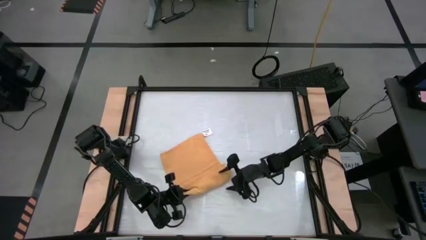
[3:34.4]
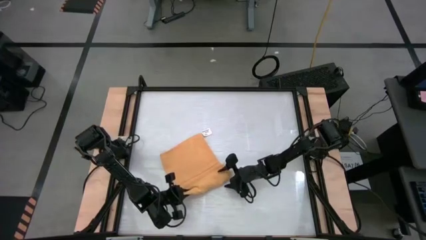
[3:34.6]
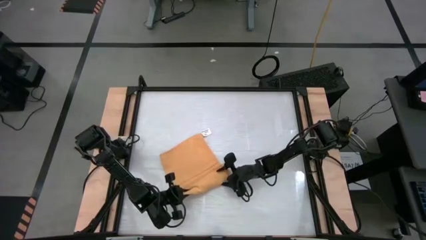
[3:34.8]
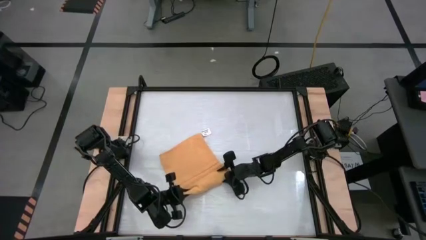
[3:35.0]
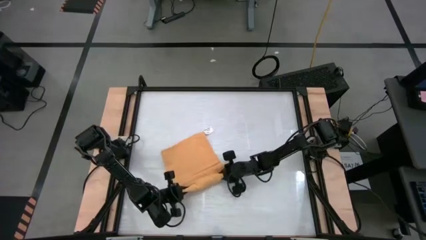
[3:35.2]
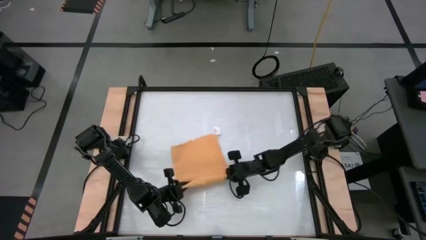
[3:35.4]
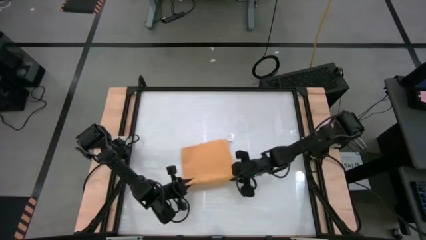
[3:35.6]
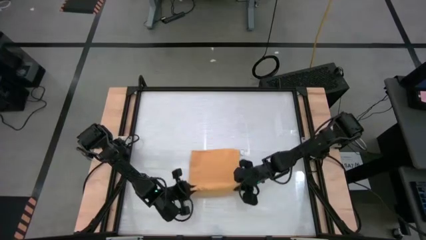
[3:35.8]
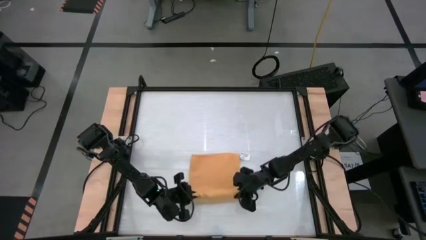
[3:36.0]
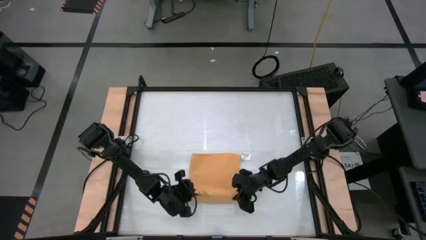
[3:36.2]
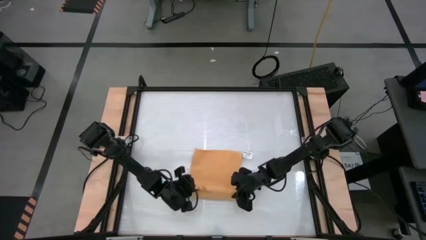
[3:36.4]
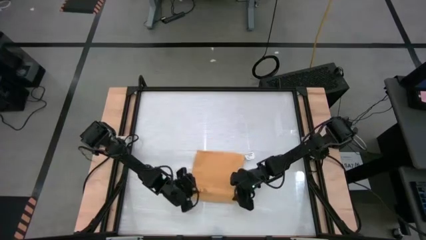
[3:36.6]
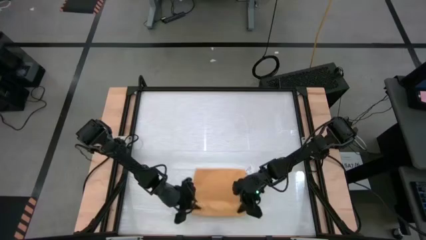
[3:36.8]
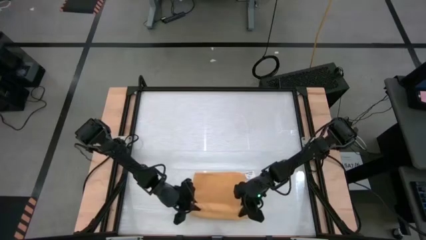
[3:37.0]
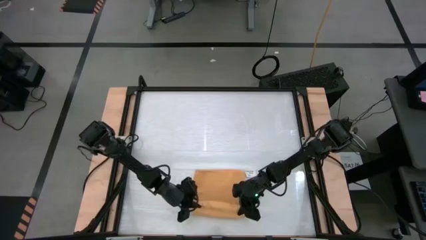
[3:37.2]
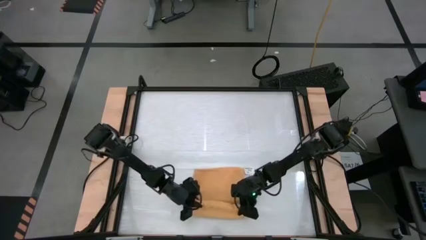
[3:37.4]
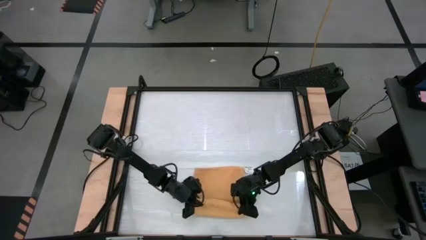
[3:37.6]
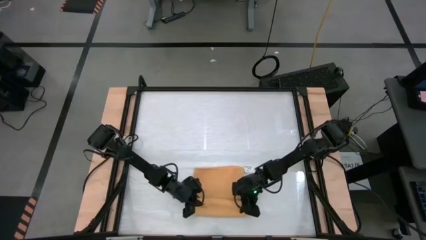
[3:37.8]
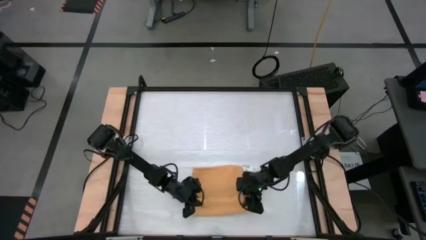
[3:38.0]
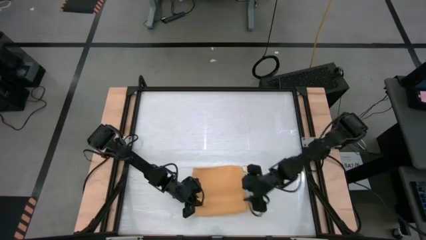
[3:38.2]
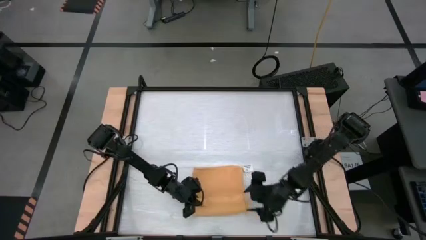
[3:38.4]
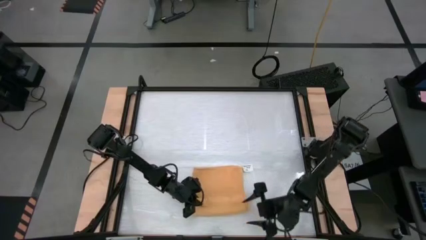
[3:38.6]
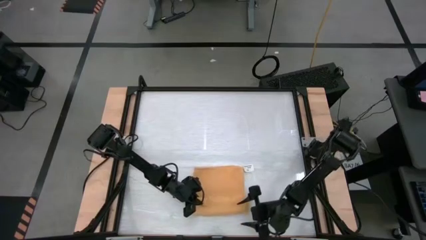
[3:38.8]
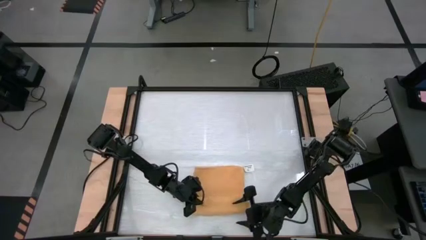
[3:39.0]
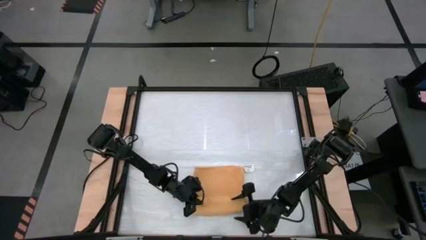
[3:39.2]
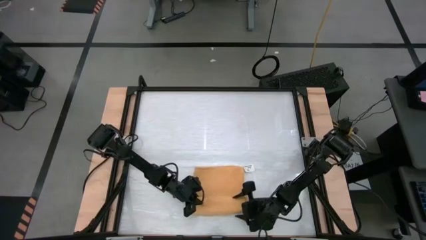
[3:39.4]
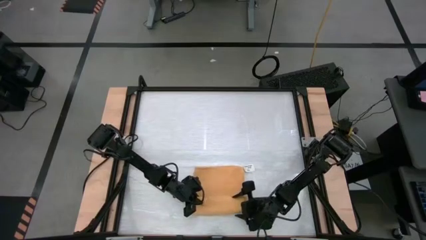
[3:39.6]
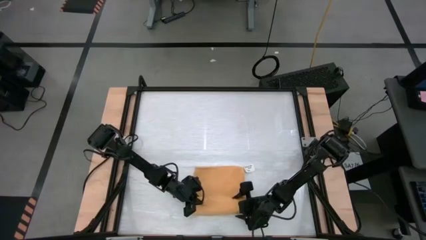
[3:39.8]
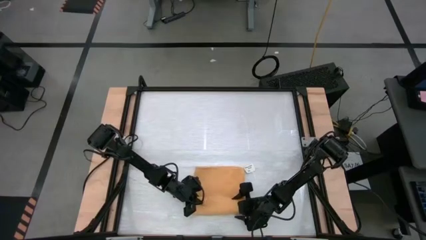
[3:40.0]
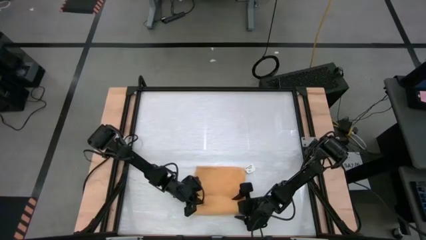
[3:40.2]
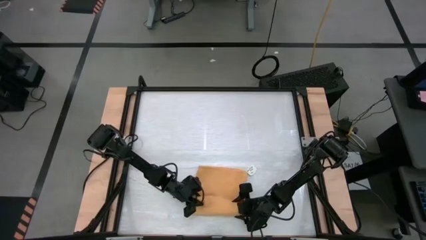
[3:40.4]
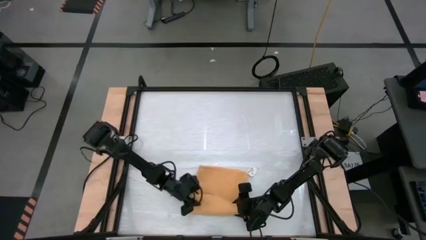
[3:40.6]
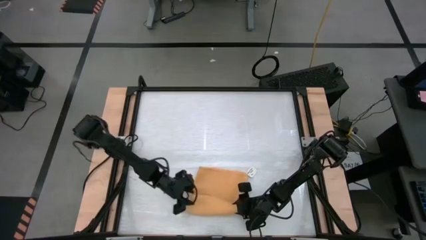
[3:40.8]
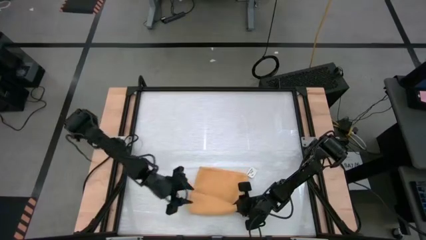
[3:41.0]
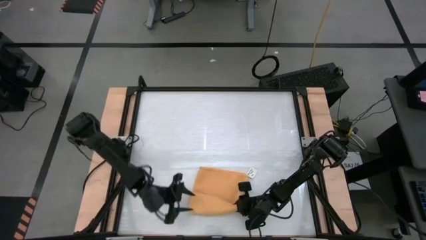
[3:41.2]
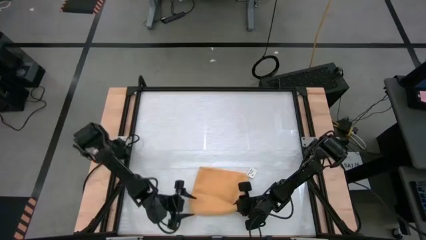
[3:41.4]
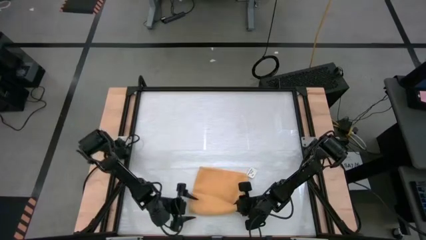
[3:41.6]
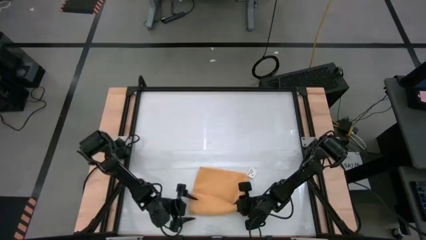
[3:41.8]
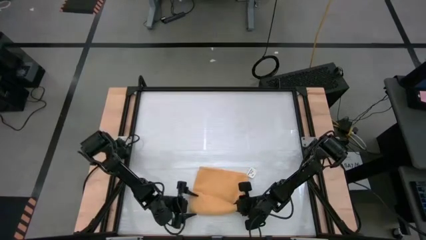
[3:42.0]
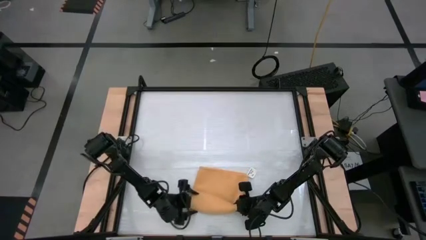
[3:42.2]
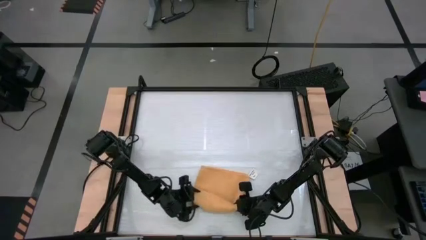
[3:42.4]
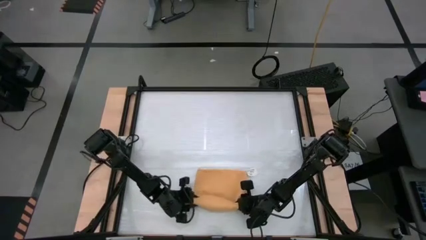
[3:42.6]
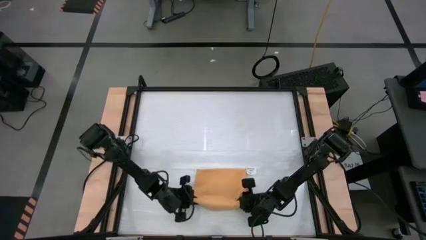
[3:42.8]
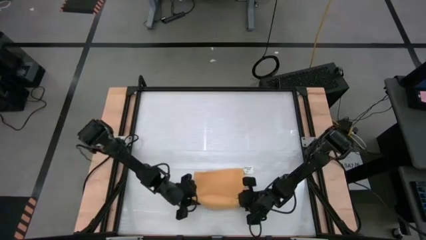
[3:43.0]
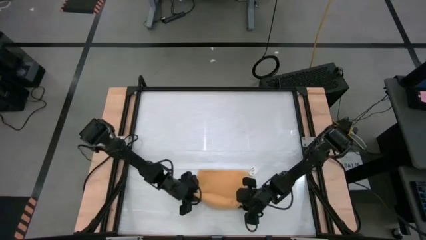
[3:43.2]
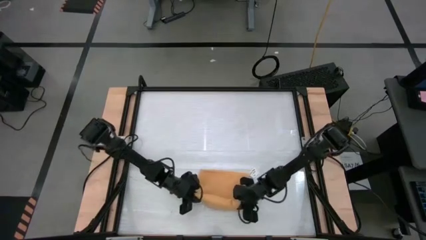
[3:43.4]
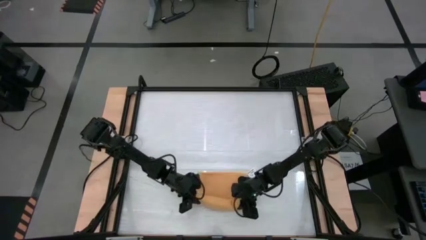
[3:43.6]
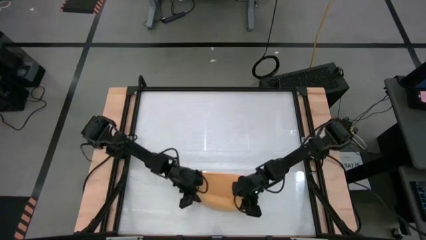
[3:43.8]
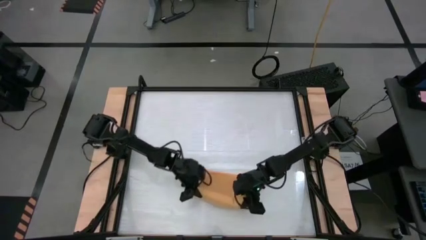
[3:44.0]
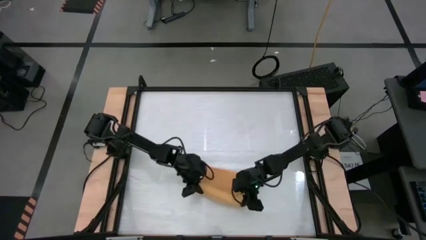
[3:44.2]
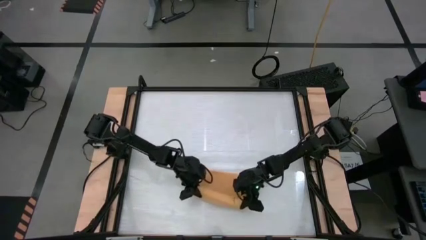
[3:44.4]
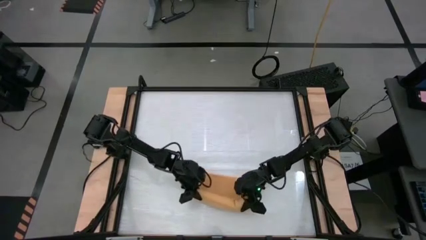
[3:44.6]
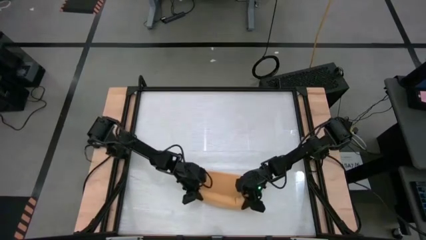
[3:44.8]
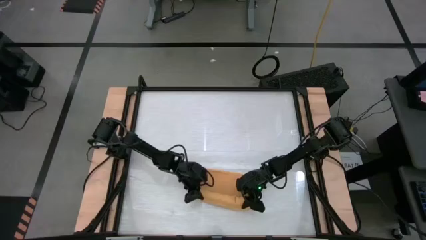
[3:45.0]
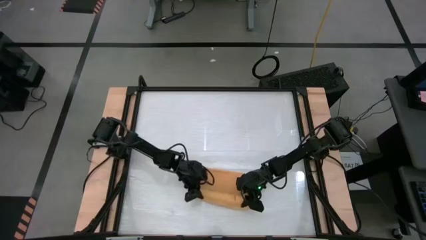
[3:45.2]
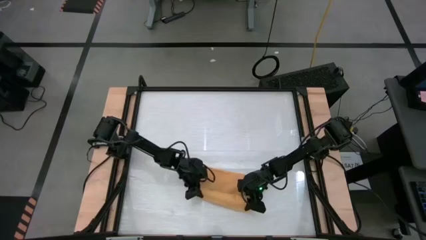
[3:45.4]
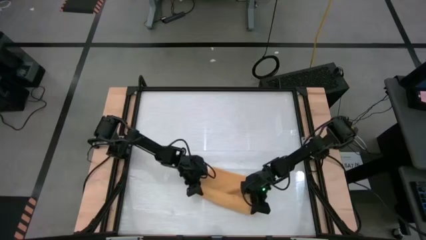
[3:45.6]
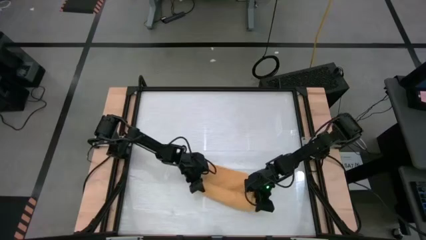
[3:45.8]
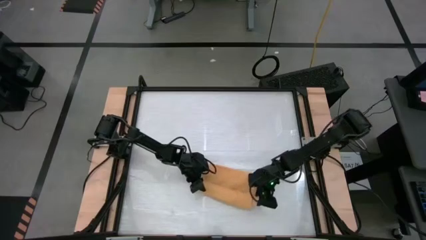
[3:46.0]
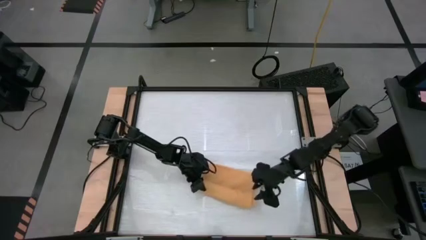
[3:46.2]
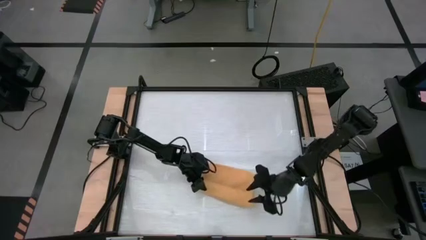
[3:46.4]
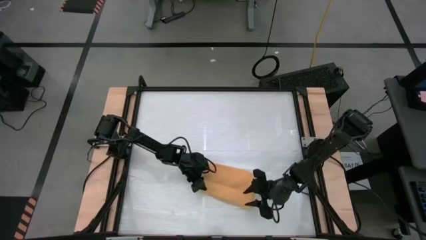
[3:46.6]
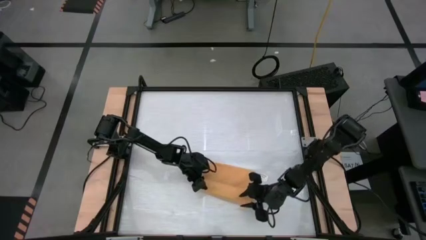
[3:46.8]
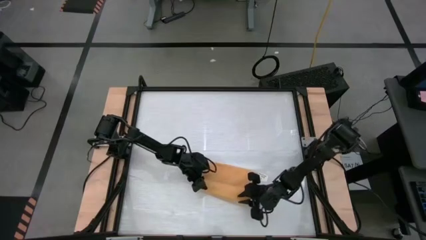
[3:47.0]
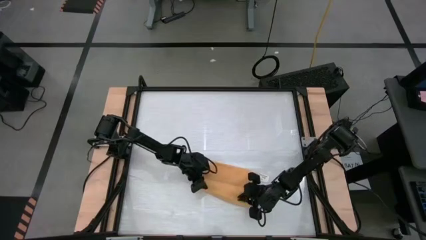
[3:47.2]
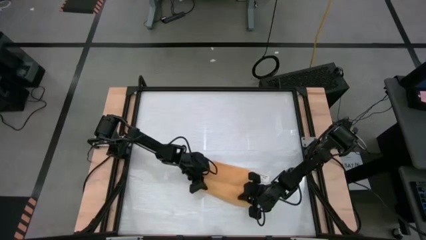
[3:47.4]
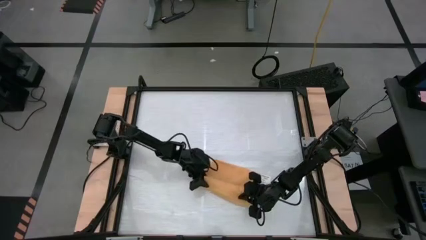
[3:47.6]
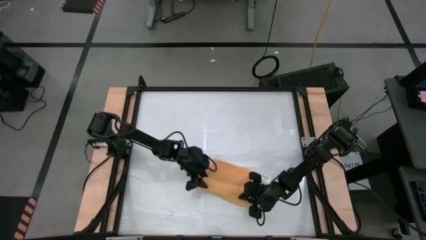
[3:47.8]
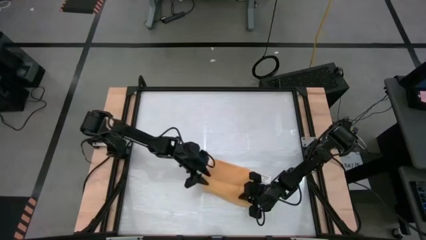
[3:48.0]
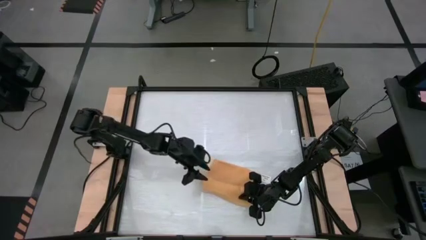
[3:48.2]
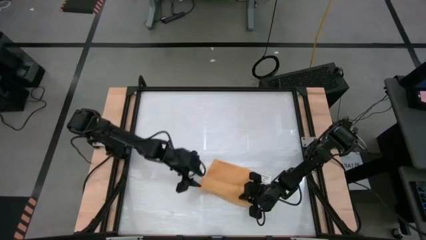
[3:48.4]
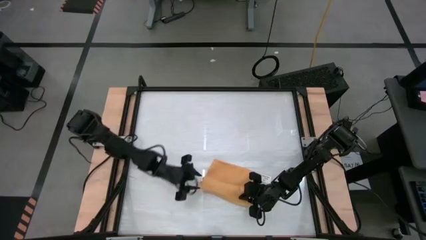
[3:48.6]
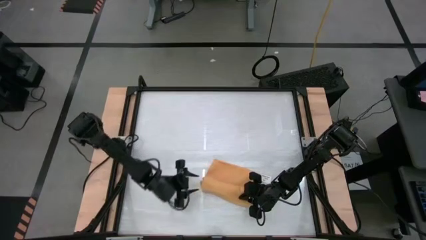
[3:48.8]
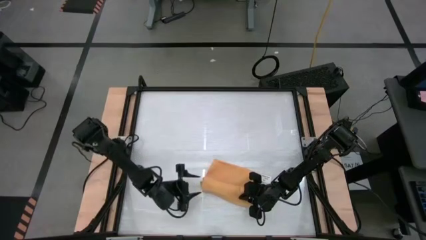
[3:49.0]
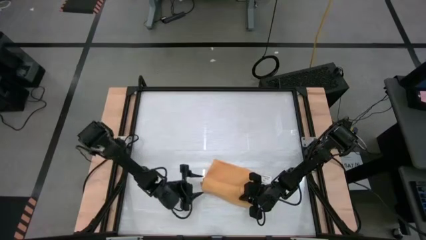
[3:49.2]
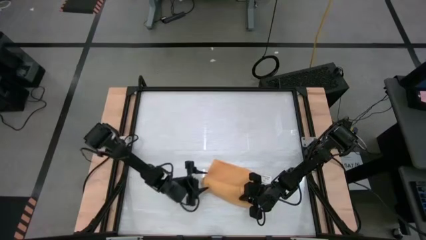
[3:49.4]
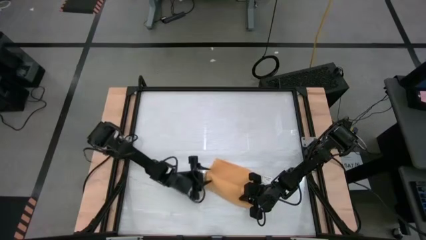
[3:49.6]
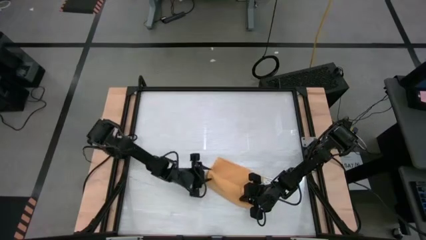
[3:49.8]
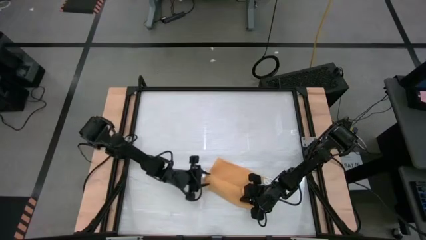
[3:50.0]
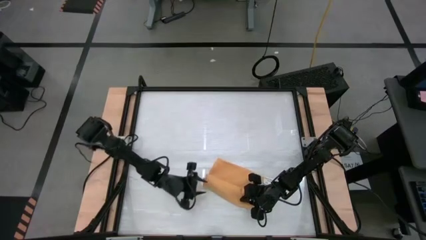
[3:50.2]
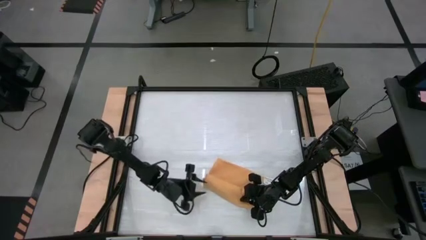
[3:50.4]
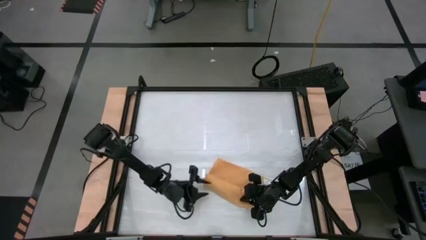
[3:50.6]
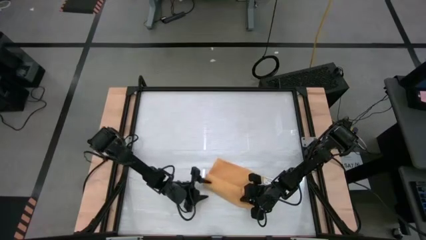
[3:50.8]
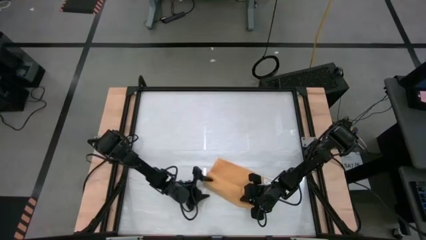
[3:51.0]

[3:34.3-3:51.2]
Task: Roll towel into tight, uniform cylinder
Roll the yellow towel
